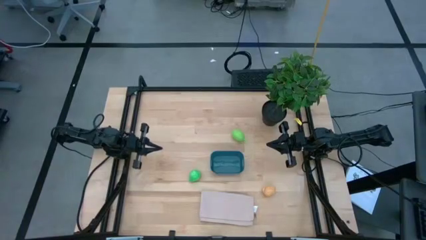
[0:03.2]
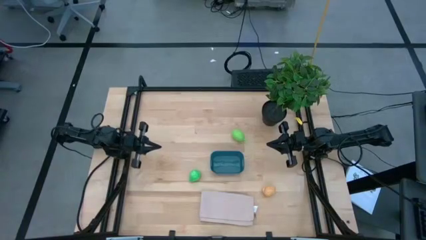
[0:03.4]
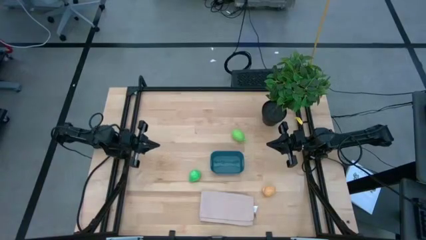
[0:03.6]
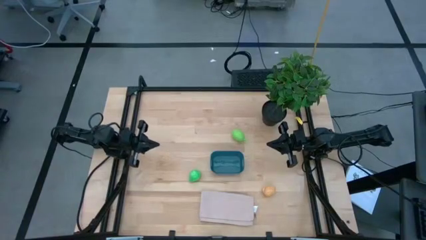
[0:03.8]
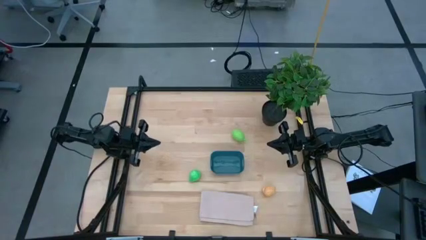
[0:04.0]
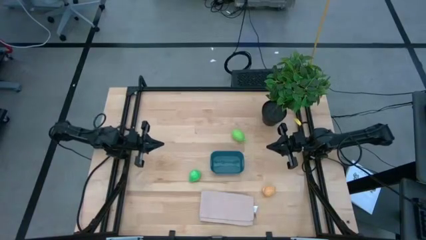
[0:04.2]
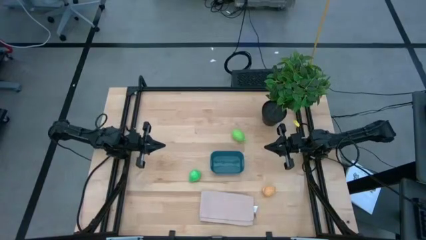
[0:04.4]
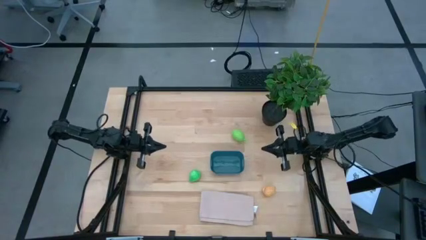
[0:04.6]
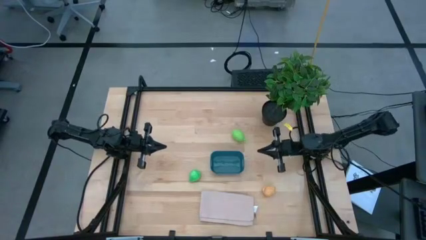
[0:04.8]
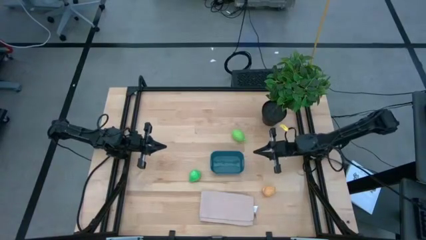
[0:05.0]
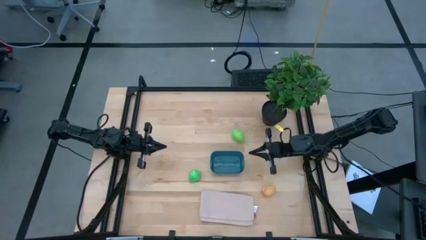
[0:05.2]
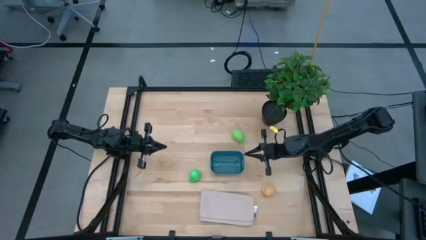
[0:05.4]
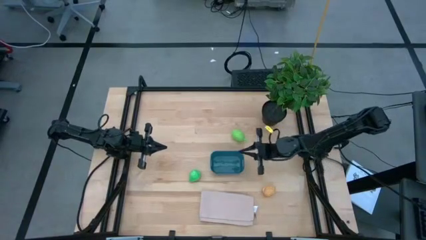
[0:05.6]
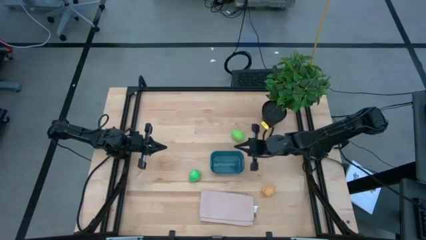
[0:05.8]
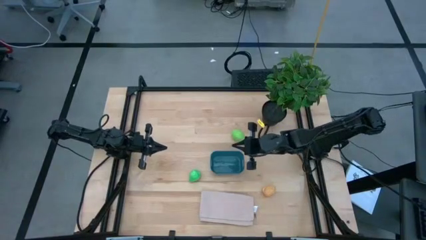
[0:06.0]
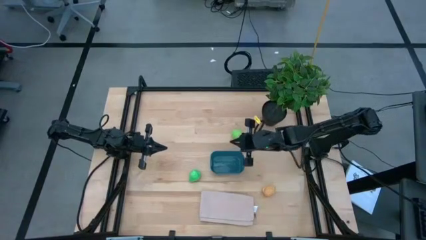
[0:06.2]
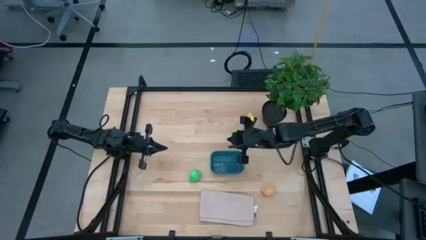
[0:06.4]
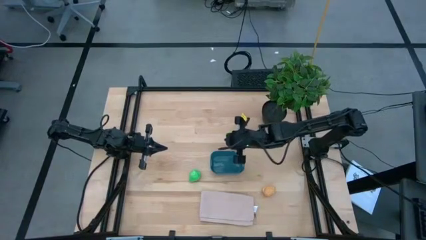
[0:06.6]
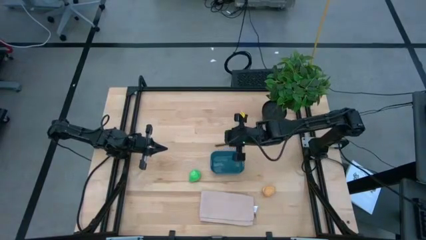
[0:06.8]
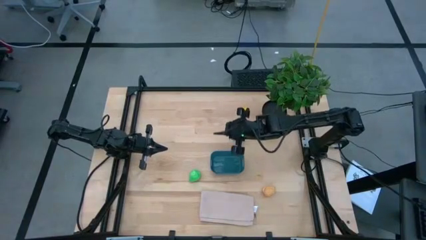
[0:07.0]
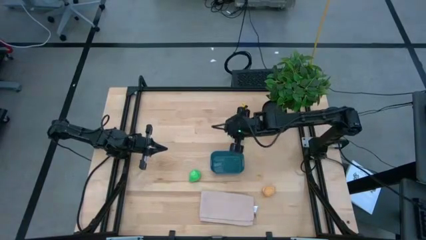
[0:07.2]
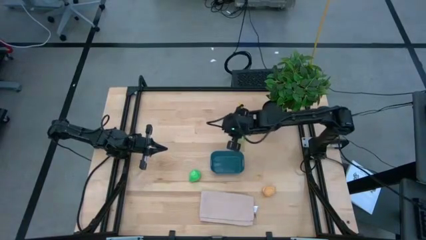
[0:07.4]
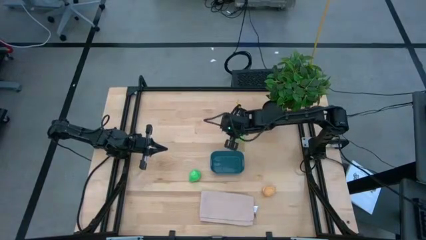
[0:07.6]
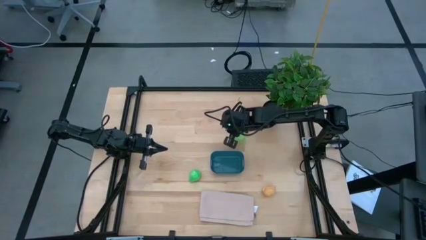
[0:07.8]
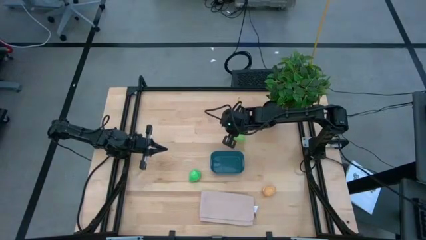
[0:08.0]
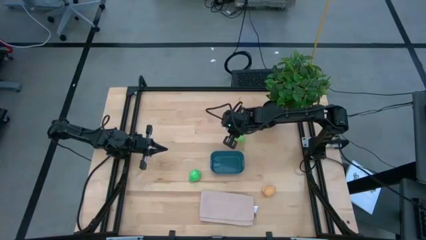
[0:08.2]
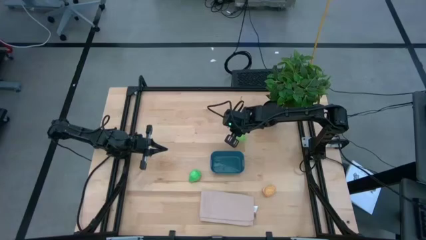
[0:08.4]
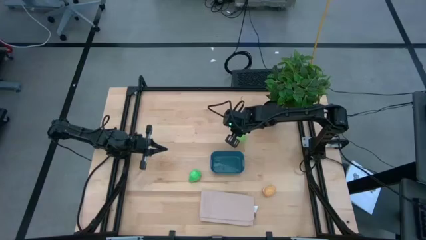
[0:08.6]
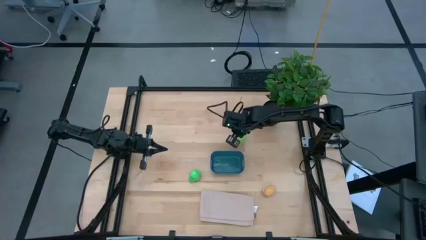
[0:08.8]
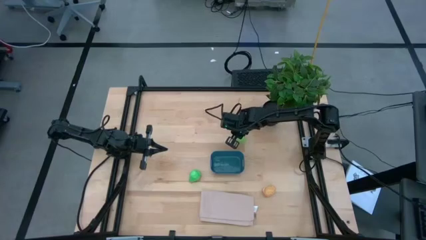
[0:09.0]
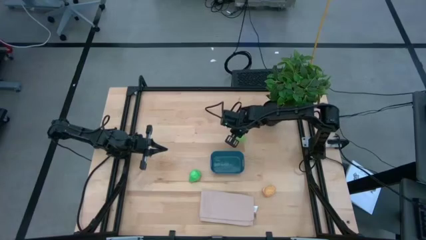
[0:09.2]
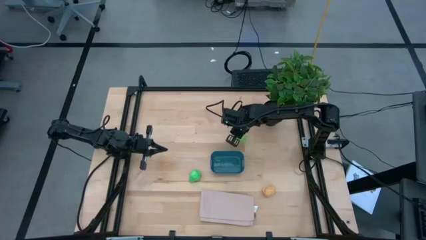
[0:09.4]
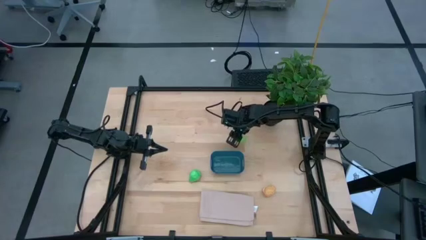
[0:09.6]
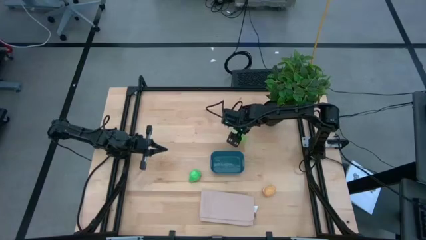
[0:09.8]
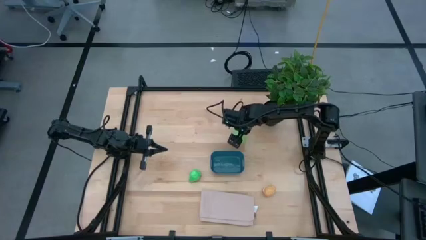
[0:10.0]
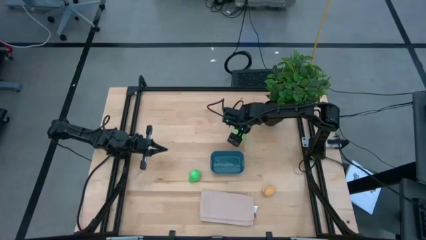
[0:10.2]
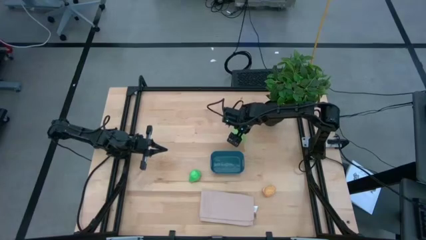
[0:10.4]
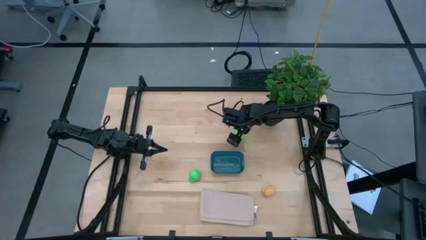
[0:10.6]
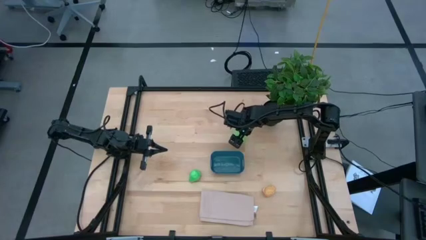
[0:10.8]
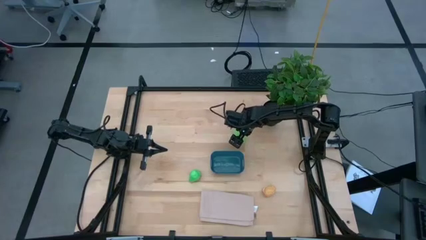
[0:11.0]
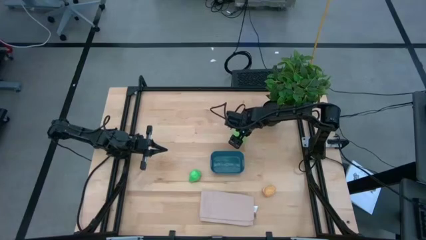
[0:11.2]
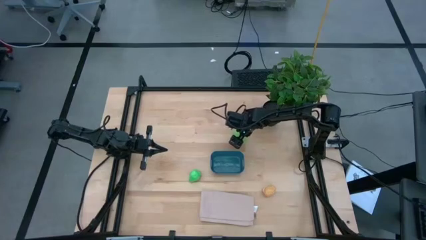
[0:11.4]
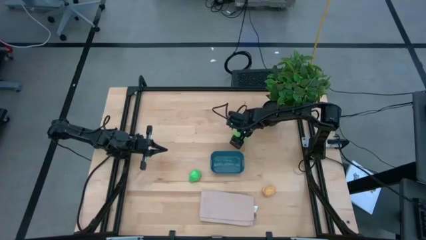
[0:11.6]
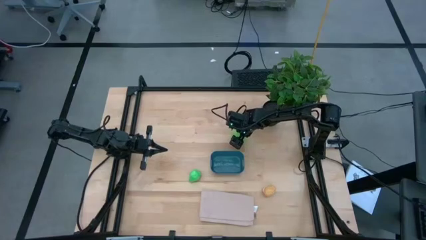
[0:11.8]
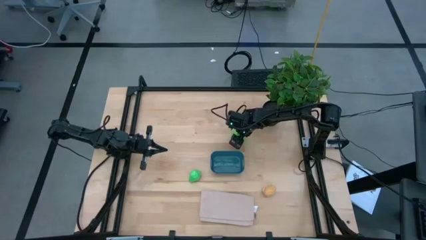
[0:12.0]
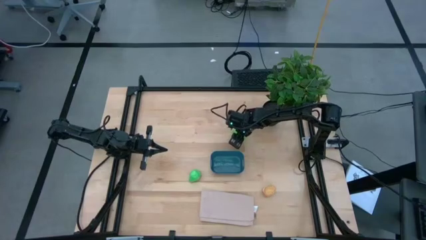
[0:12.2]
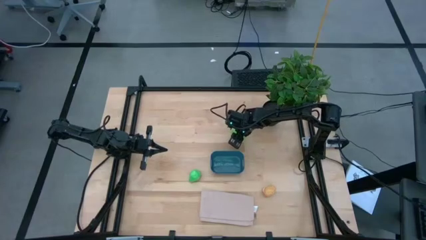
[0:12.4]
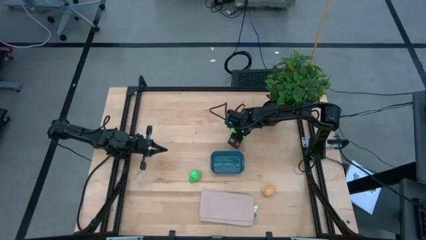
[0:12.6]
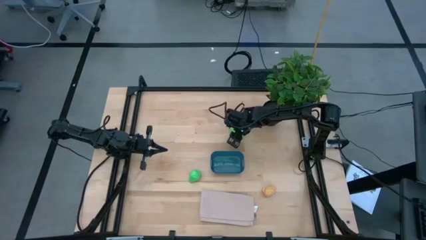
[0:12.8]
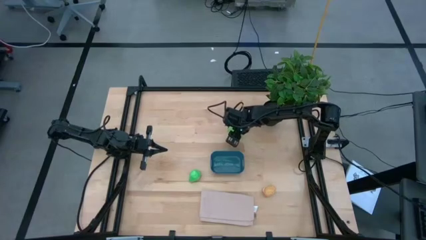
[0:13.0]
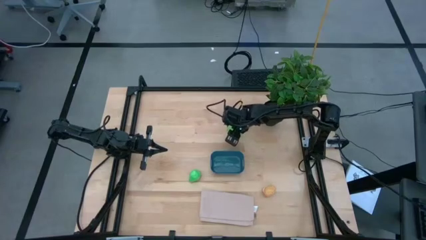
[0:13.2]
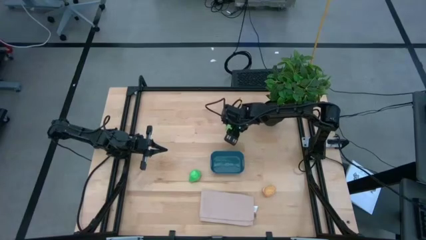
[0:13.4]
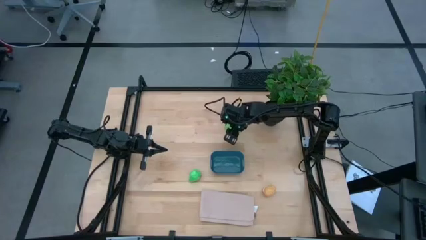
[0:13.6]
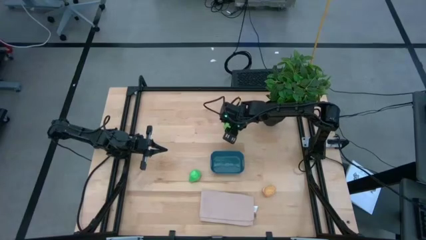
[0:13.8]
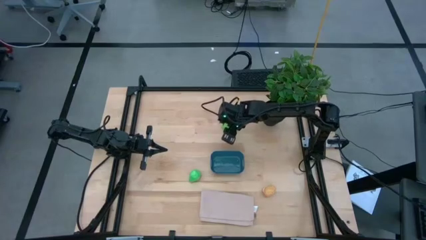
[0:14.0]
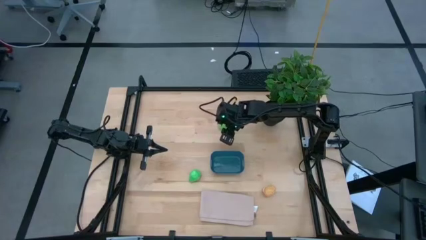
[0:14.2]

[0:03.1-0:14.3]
Task: Pick and placing Produce into tupperware
Put the green cabbage into the blue bin
